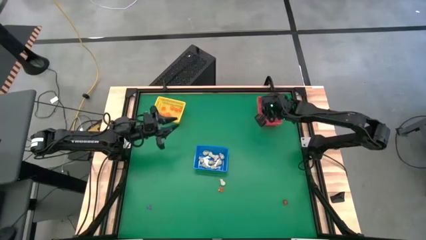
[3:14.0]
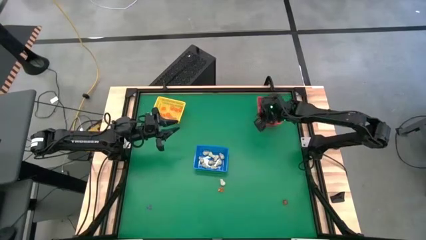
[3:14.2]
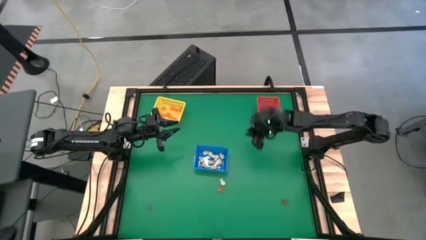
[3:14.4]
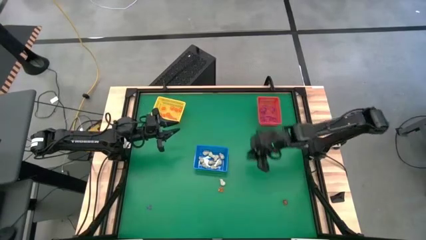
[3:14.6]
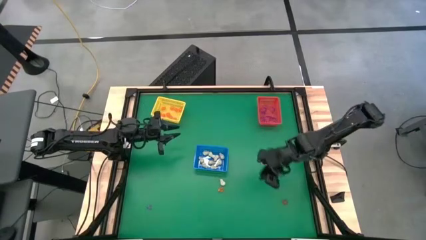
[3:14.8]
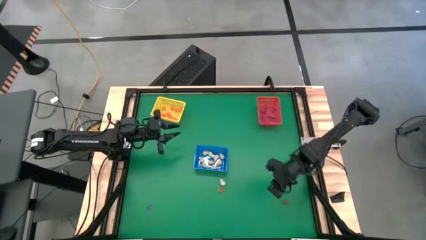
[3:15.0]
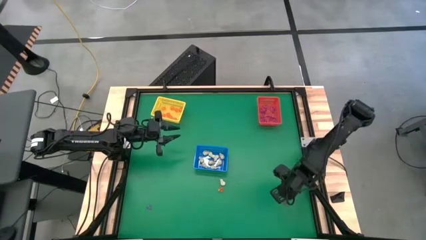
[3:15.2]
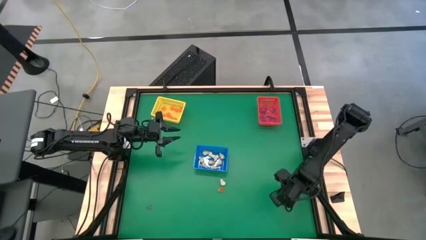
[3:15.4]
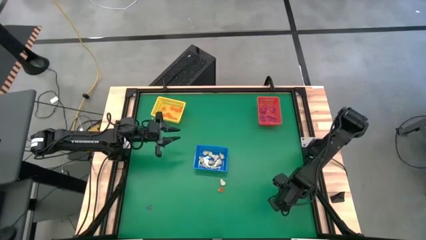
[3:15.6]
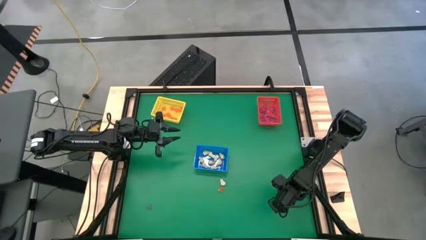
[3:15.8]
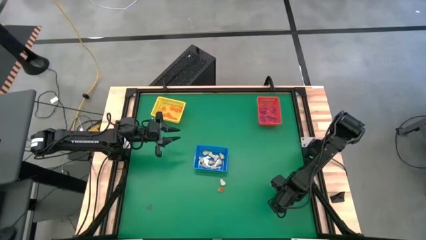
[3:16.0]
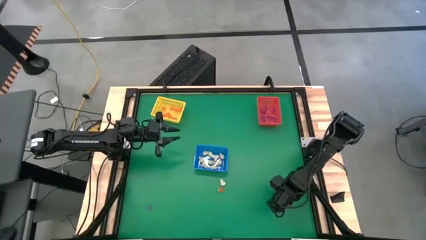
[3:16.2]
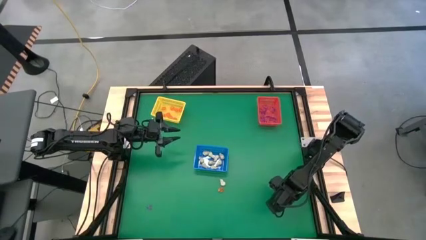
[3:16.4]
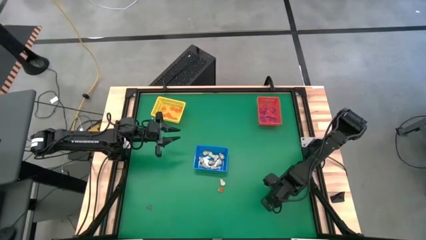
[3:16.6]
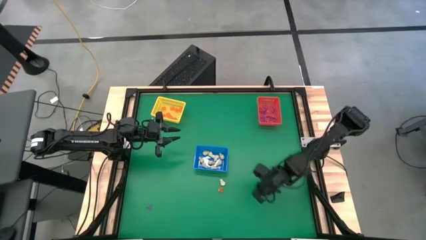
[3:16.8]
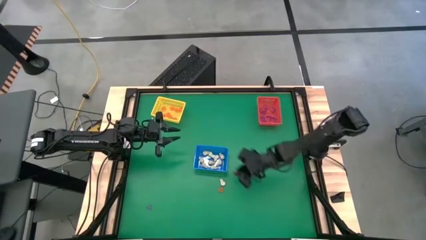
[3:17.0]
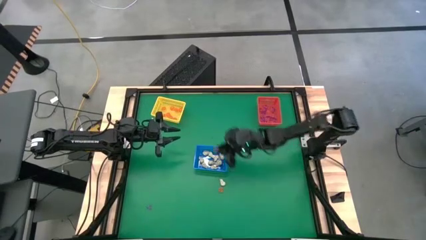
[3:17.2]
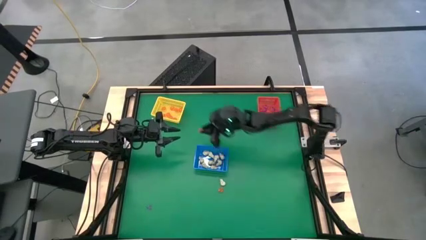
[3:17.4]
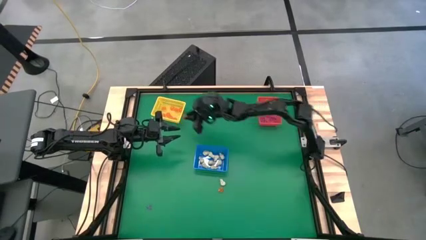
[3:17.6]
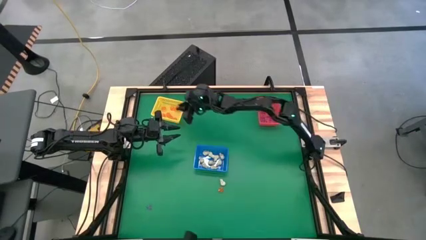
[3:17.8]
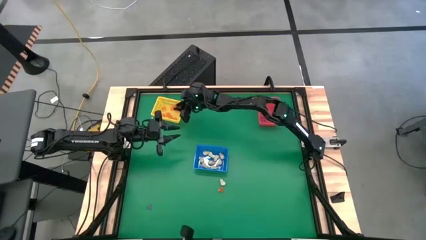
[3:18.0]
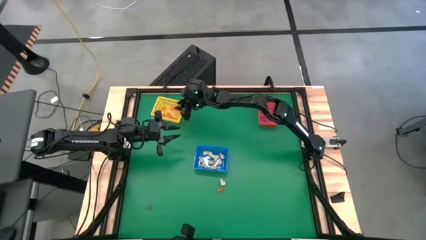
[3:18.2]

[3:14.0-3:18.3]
Task: Sort Halloween decoration
Put the orange pumpkin toy into the yellow bin

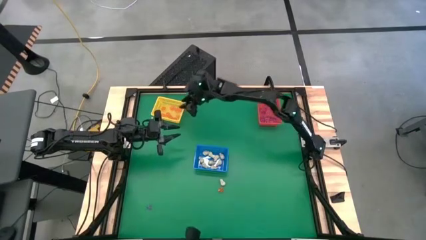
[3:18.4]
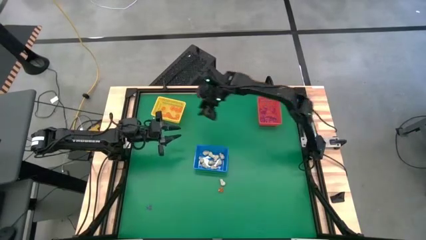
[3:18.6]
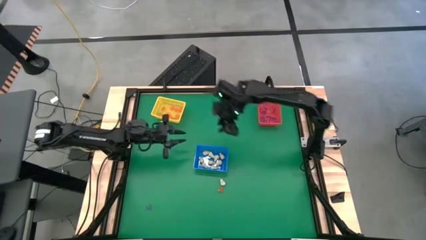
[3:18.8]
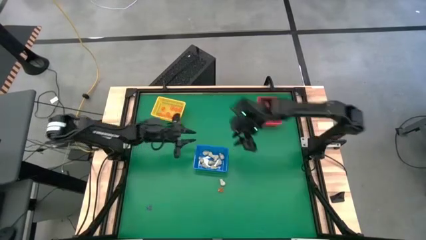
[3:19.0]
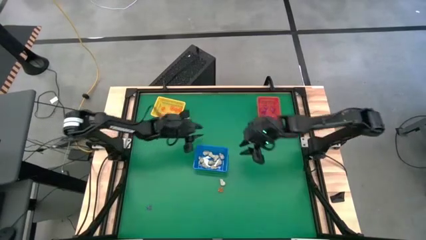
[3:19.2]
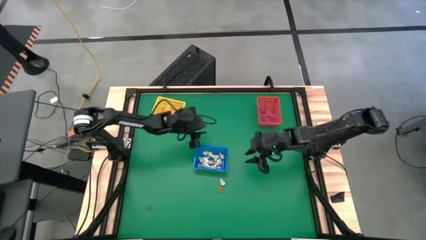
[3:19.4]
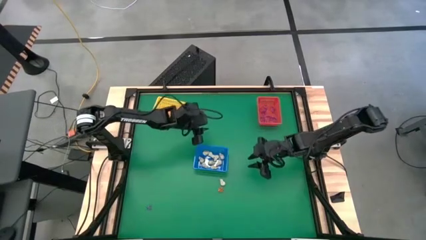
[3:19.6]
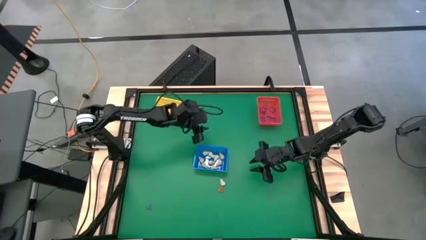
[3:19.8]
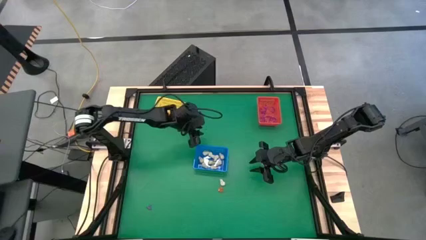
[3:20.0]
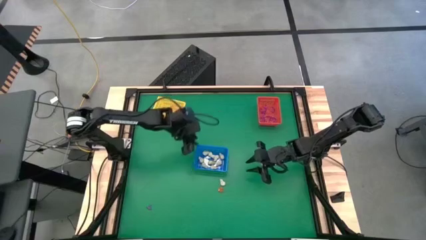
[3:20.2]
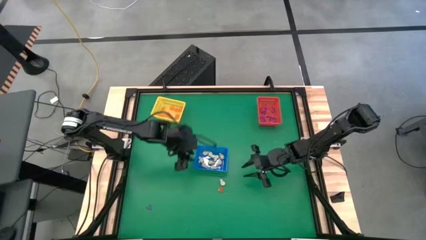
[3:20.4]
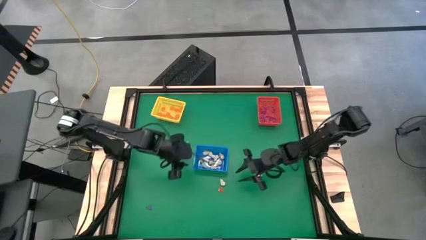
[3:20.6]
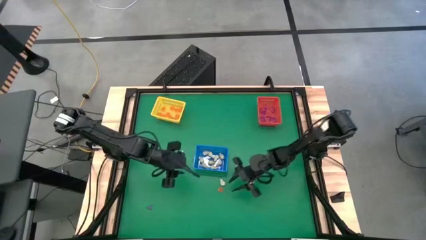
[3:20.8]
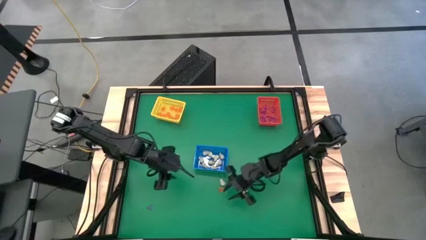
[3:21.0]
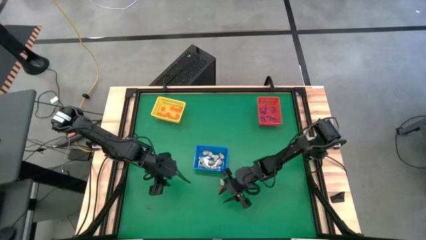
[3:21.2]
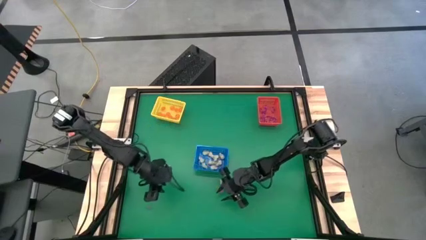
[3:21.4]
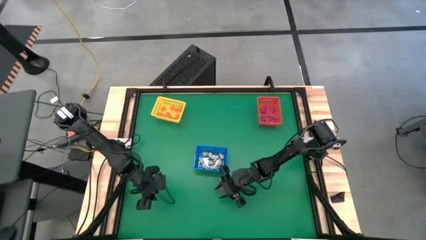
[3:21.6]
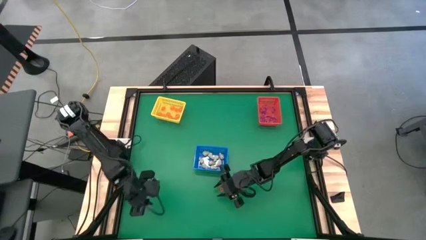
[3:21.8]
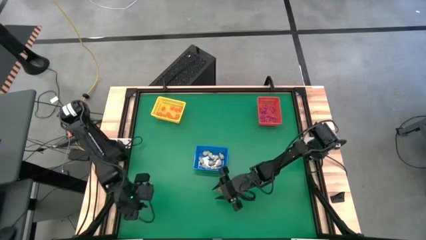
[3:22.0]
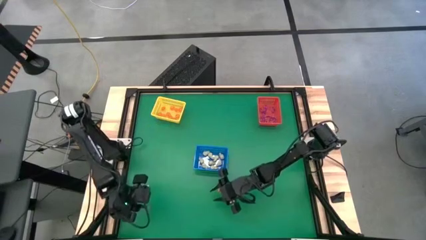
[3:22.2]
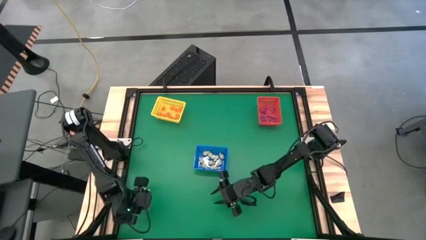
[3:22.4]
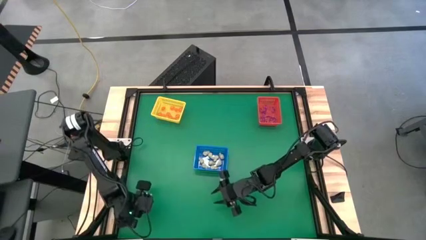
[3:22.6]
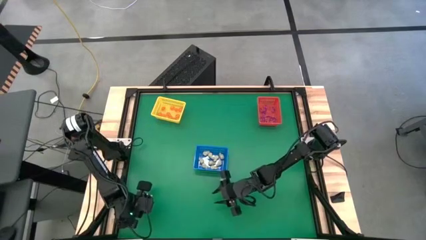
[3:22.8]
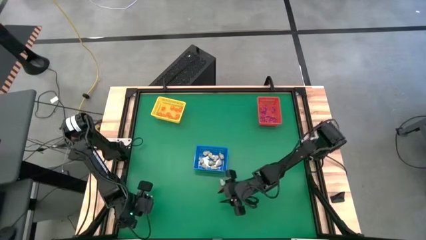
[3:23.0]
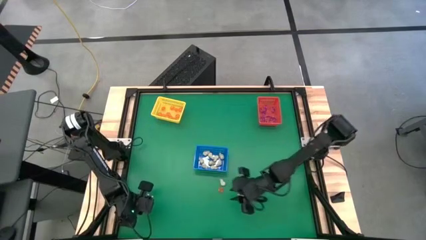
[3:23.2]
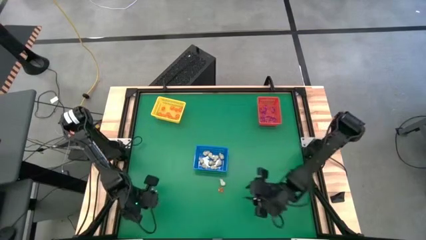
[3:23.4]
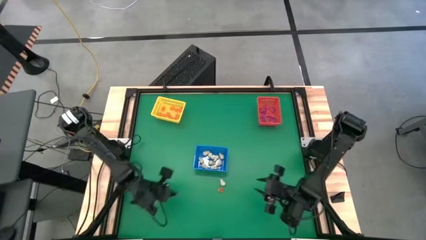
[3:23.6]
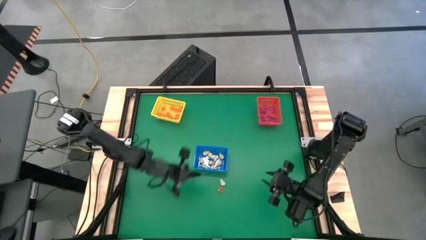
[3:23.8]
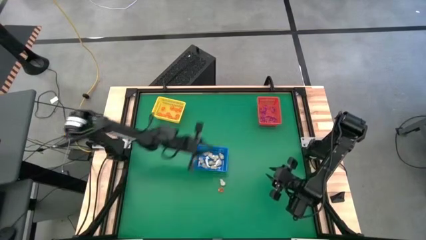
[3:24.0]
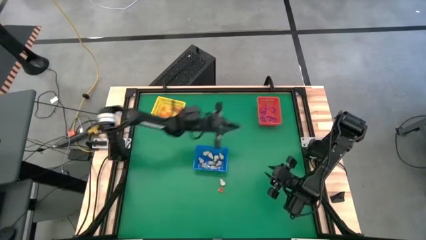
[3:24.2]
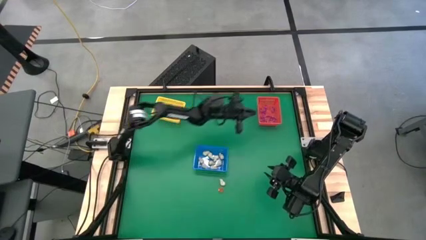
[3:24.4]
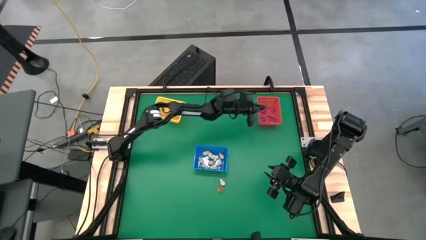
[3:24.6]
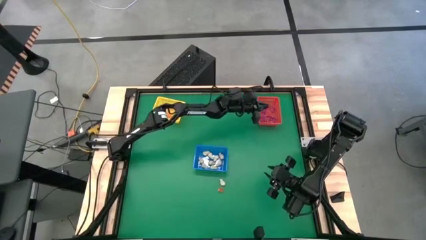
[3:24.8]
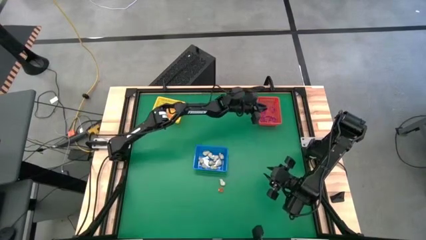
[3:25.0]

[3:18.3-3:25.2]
Put the purple witch hat toy into the red bin

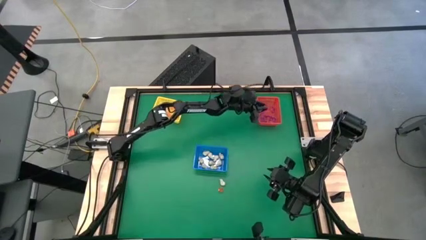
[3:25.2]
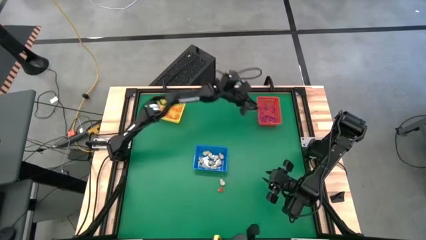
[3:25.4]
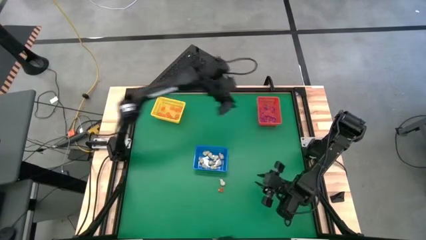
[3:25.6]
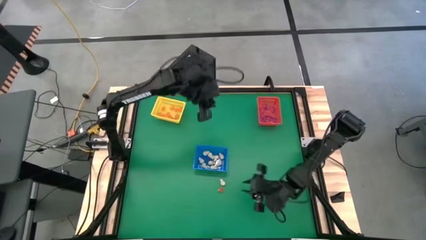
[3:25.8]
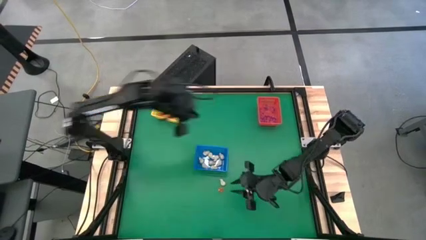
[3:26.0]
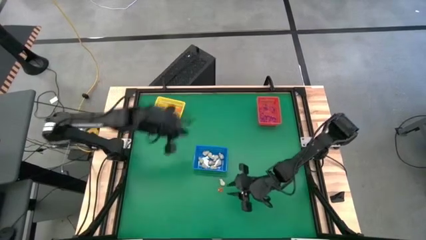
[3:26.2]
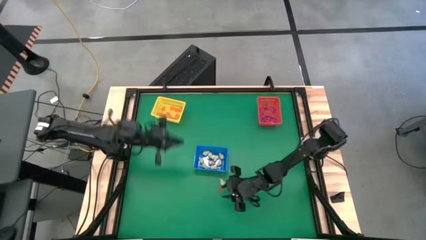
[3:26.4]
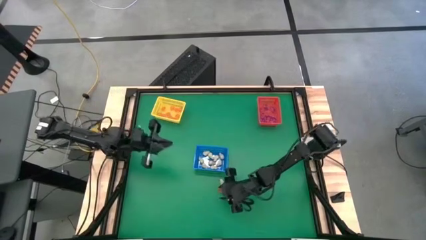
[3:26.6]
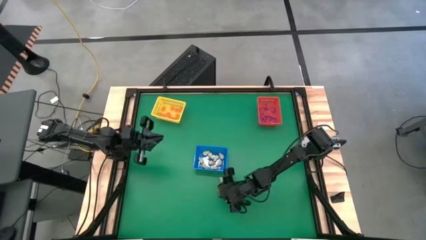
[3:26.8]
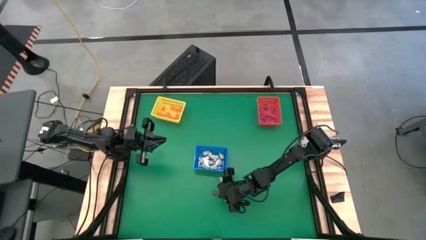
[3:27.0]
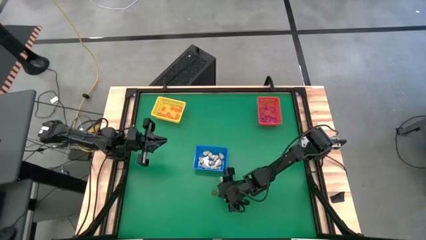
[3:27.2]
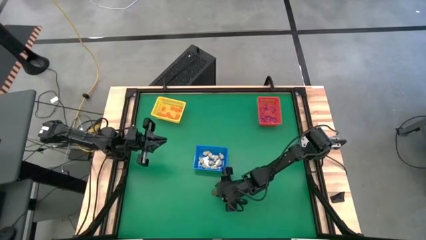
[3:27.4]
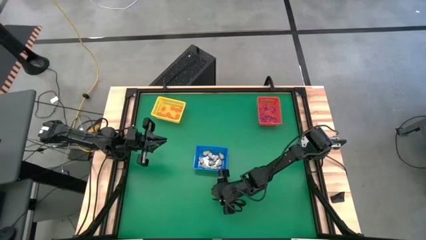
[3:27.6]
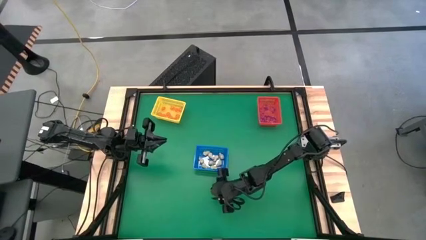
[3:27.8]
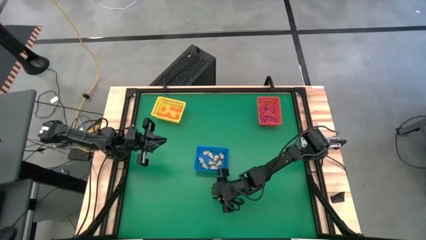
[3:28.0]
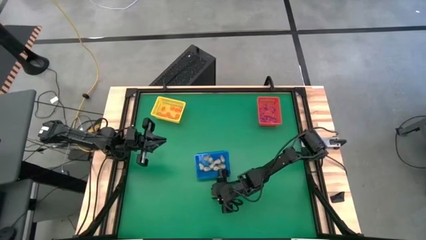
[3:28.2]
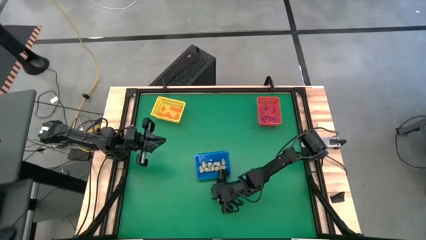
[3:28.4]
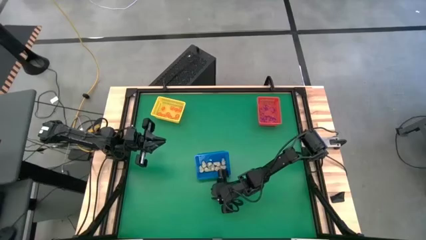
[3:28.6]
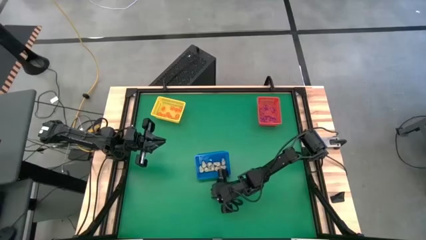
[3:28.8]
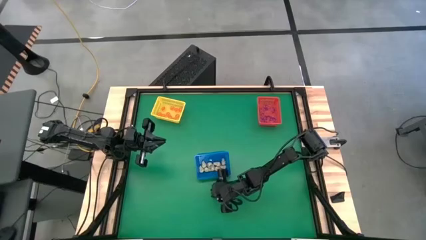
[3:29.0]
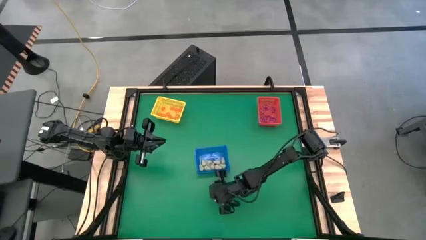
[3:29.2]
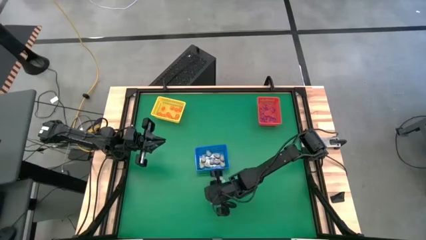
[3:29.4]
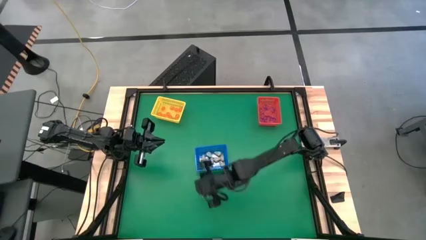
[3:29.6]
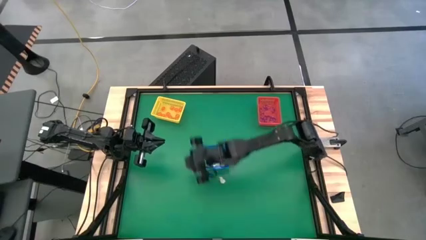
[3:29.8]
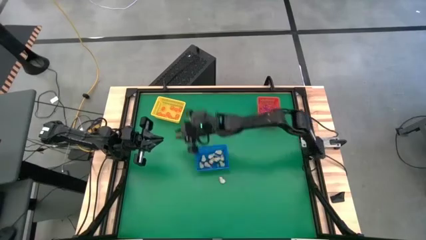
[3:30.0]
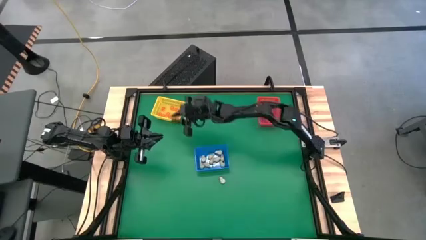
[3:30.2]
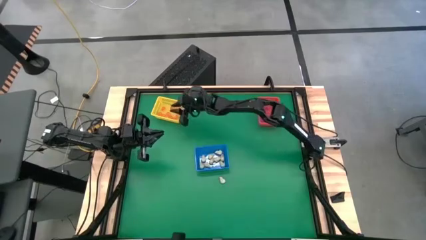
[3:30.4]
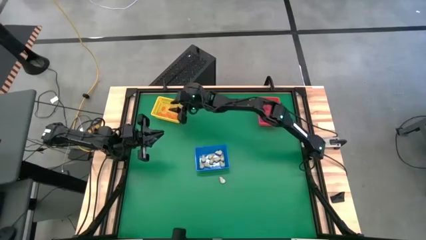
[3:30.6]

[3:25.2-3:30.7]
Put the orange pumpkin toy into the yellow bin
